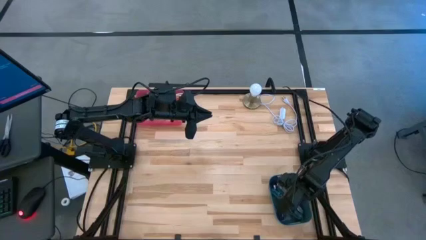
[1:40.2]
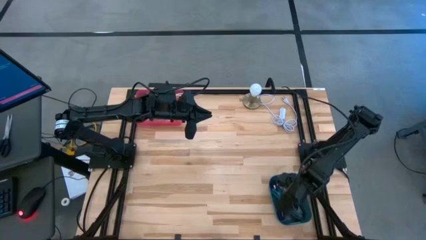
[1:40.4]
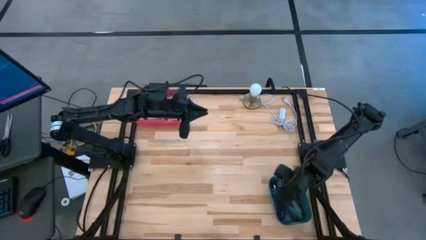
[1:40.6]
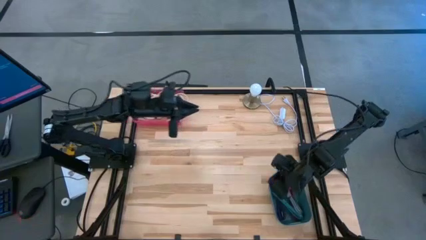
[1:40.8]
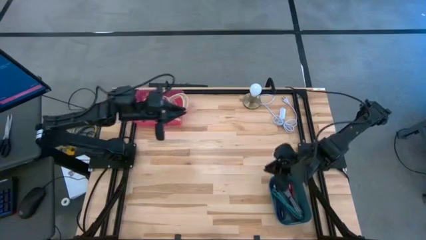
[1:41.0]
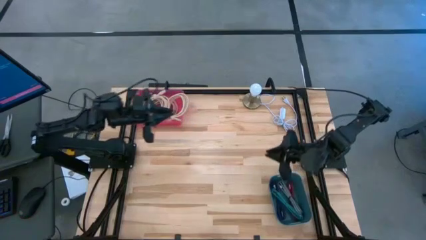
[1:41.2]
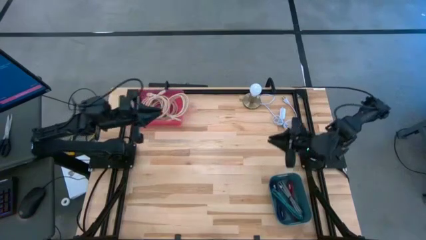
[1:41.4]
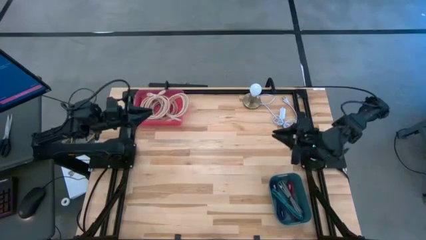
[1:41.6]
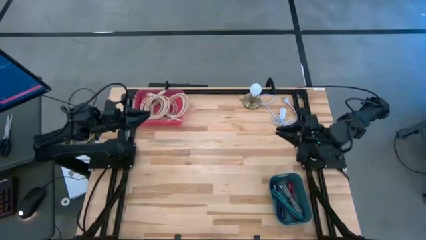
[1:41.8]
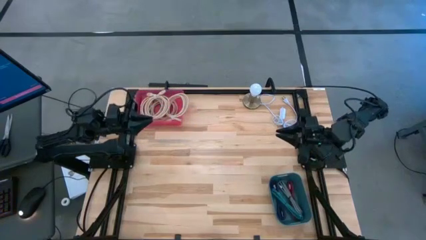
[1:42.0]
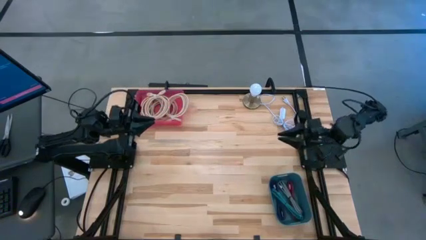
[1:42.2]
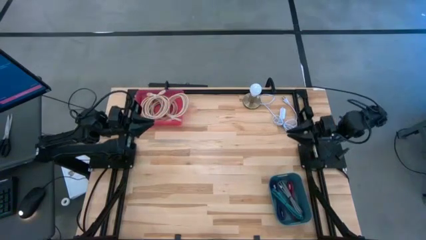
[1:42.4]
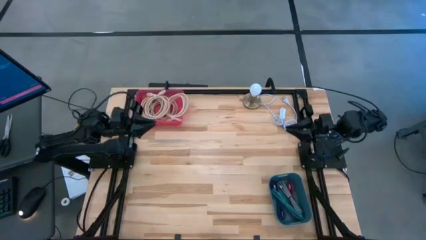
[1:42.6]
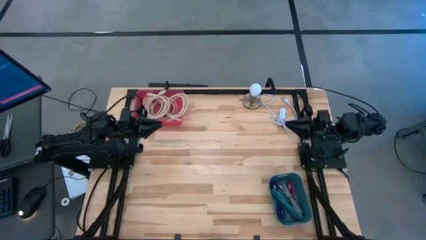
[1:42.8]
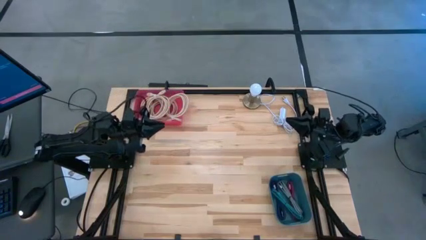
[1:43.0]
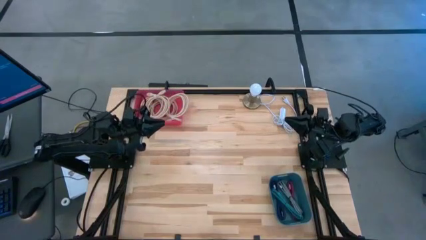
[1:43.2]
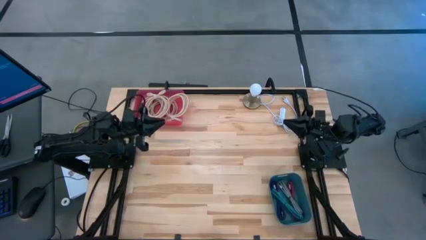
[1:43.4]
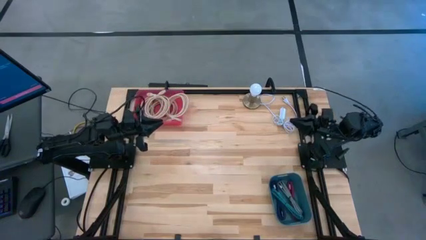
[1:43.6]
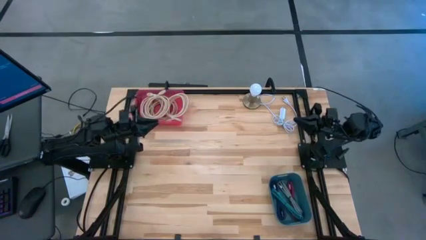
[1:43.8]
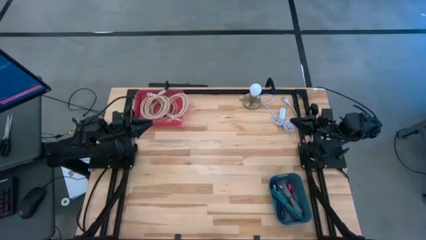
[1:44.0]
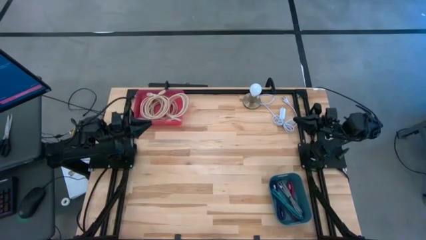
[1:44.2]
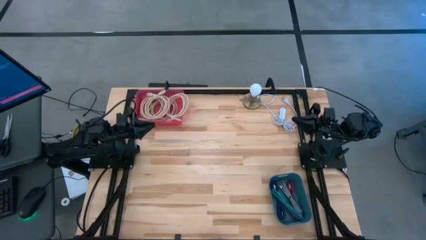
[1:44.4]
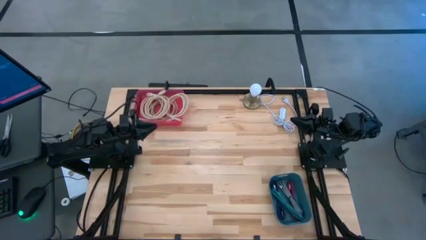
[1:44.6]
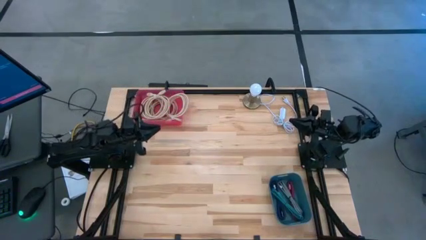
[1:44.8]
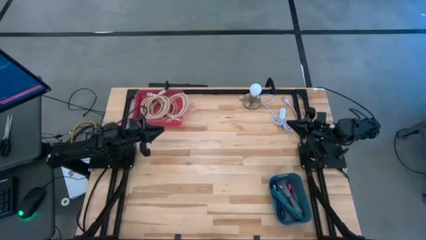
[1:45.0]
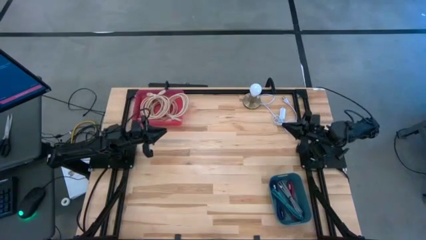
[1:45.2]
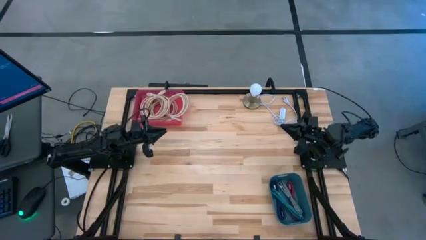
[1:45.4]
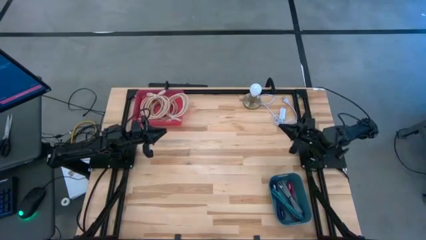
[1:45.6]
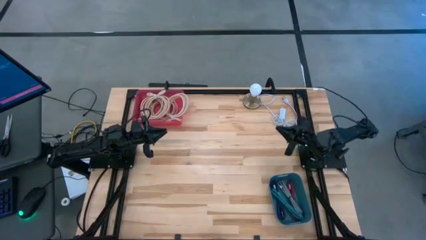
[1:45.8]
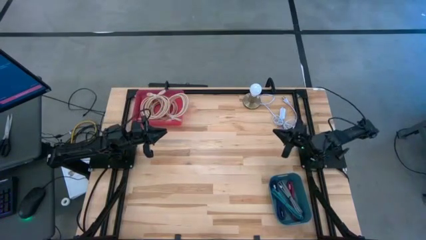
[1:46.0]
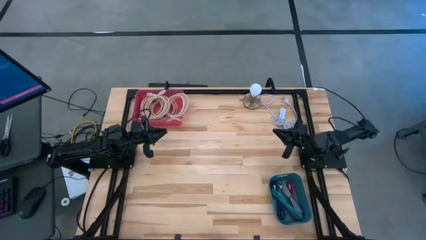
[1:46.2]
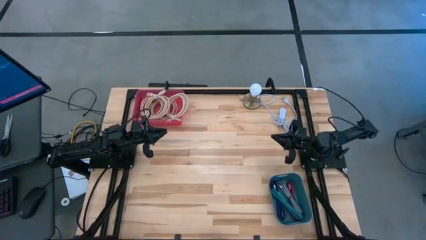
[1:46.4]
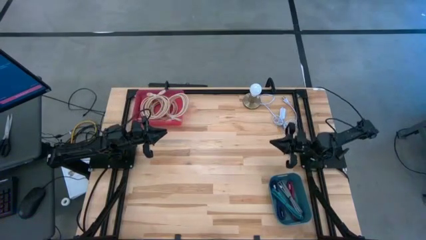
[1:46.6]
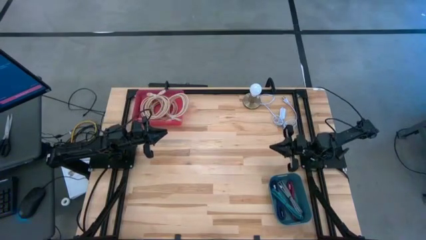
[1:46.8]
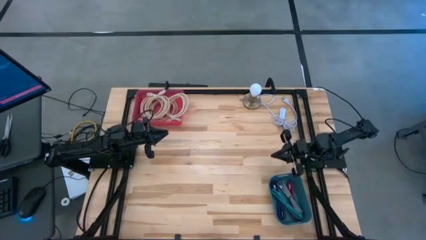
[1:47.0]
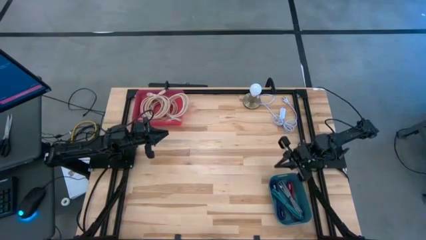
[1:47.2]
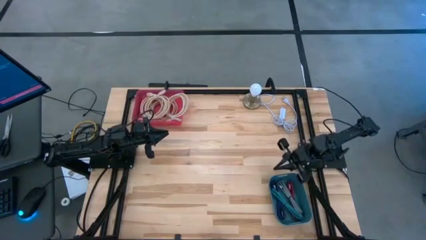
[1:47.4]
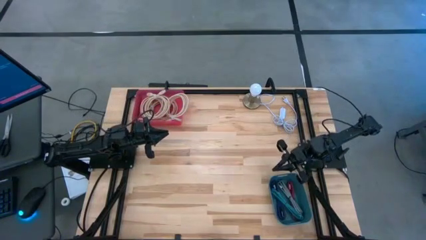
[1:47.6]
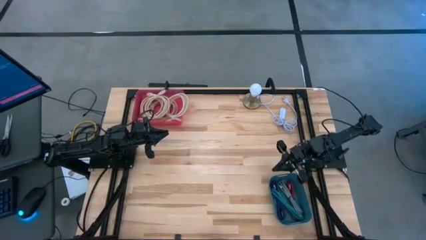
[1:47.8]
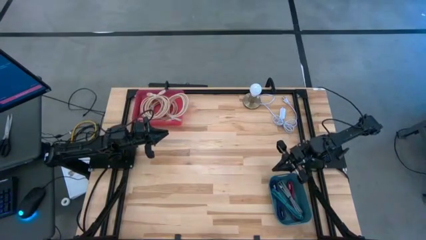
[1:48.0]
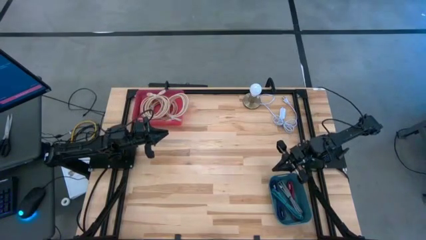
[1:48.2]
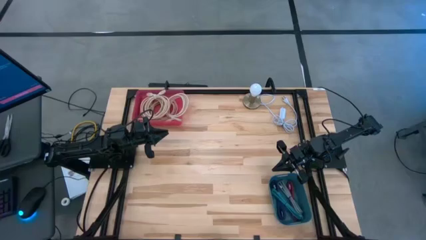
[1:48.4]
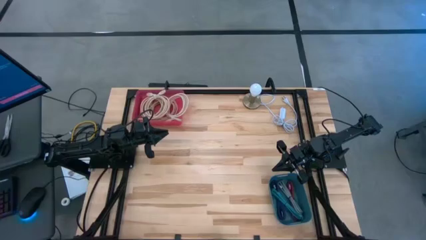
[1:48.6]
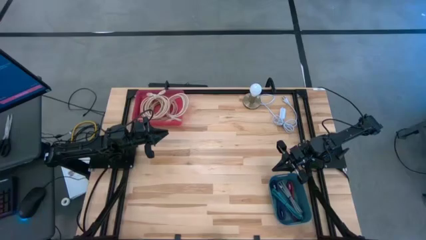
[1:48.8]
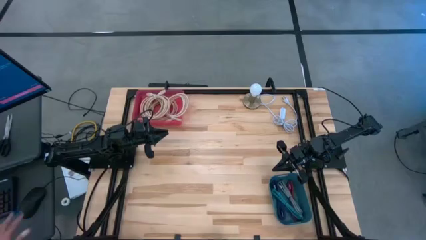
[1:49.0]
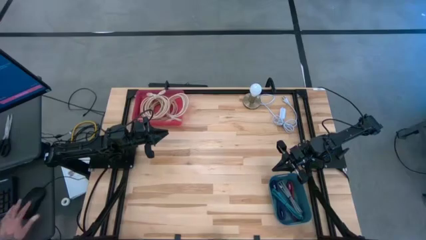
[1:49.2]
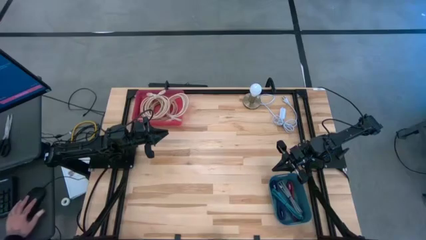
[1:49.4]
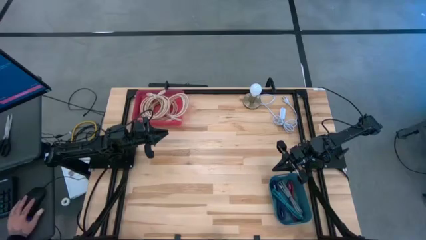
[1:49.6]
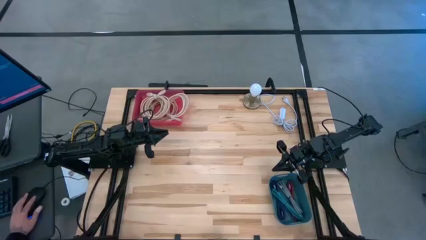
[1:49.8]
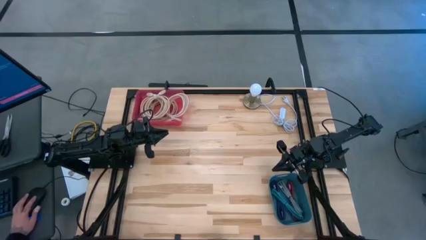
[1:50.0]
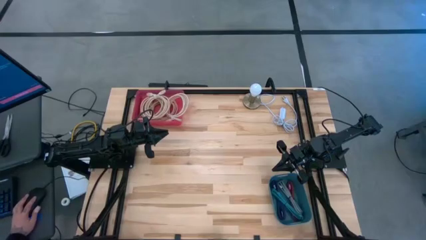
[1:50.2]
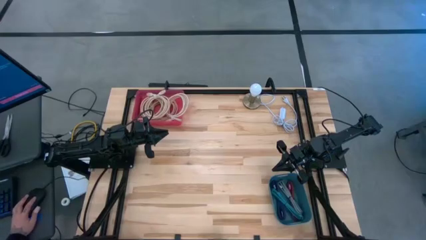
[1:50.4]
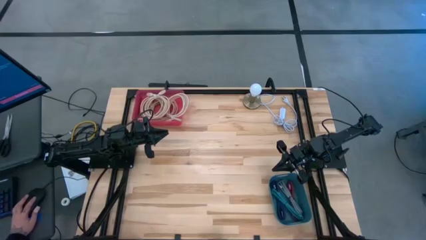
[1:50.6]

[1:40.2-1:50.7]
Task: Pick & Place USB Port
Return to Home Position

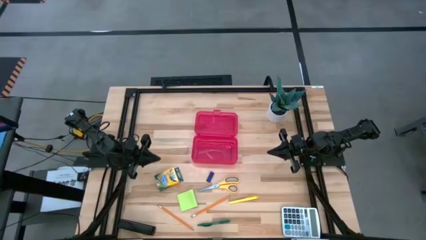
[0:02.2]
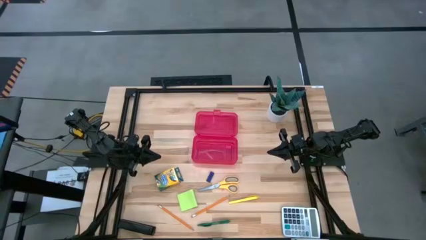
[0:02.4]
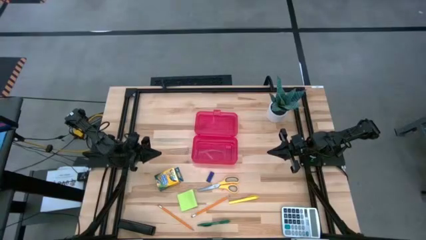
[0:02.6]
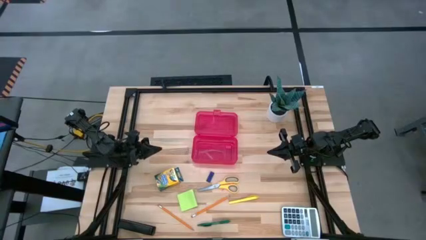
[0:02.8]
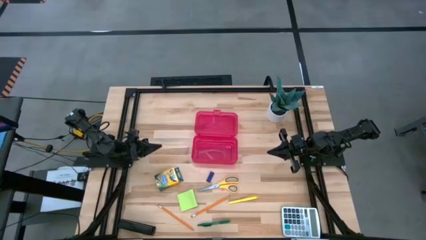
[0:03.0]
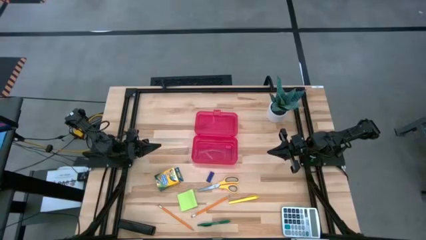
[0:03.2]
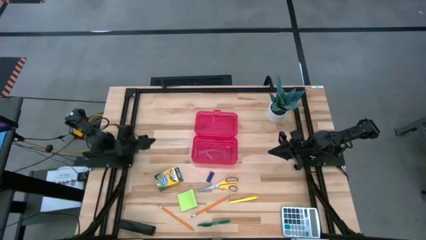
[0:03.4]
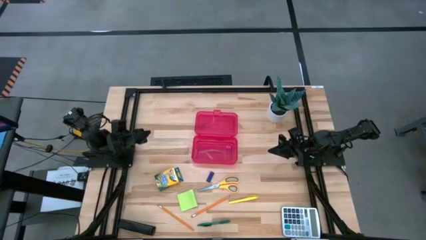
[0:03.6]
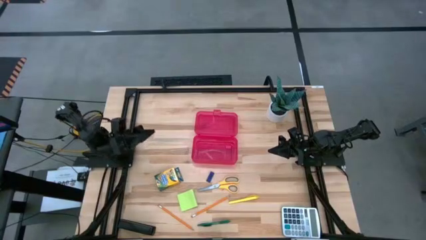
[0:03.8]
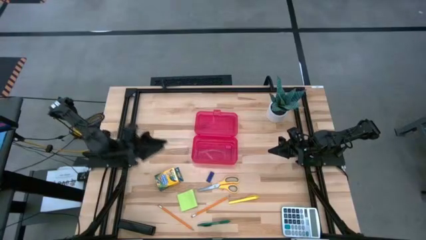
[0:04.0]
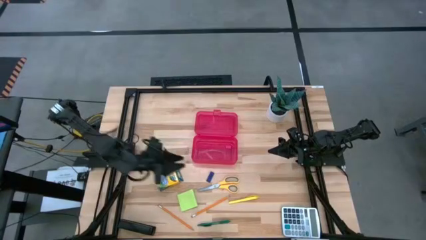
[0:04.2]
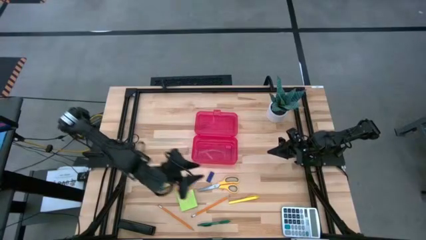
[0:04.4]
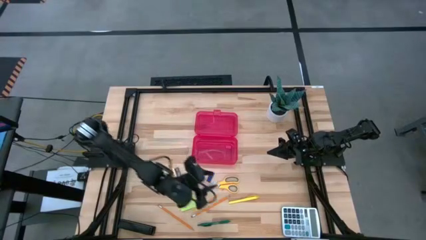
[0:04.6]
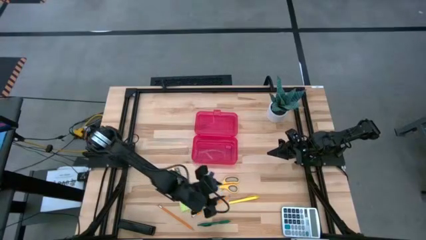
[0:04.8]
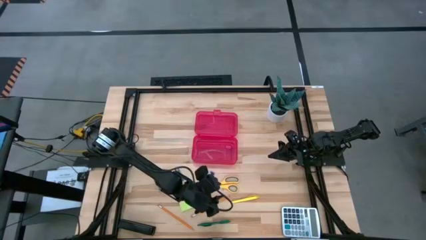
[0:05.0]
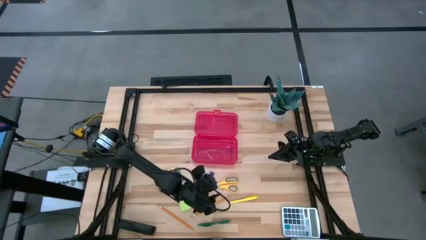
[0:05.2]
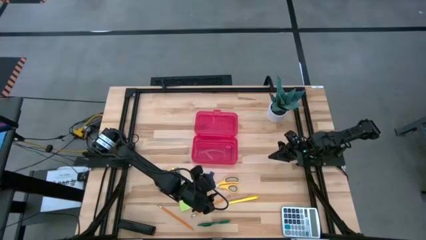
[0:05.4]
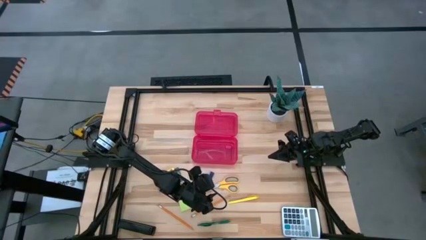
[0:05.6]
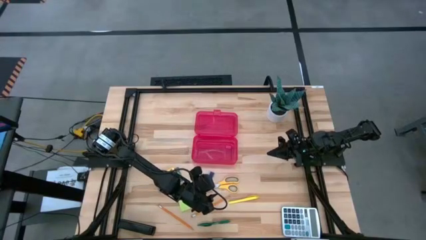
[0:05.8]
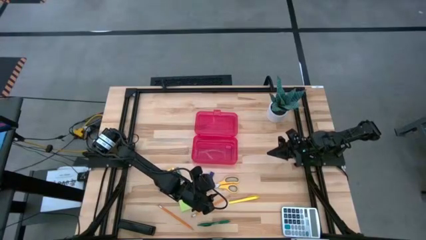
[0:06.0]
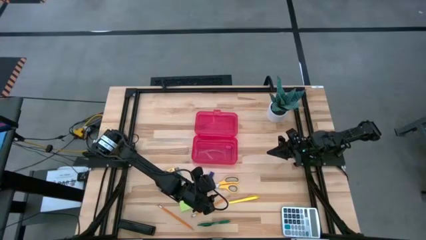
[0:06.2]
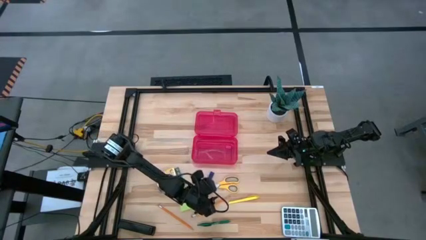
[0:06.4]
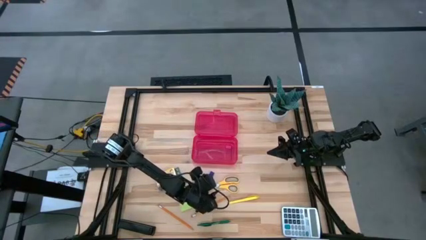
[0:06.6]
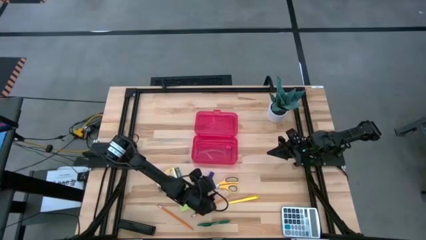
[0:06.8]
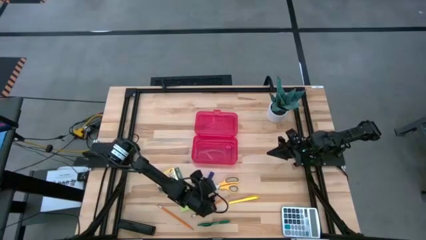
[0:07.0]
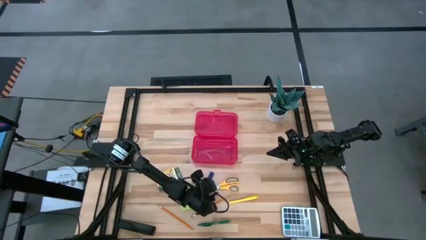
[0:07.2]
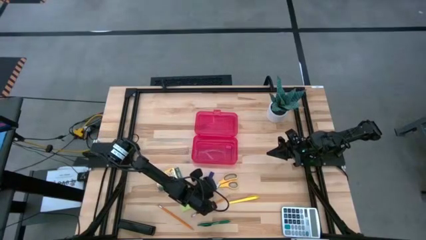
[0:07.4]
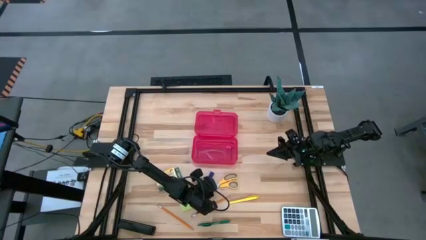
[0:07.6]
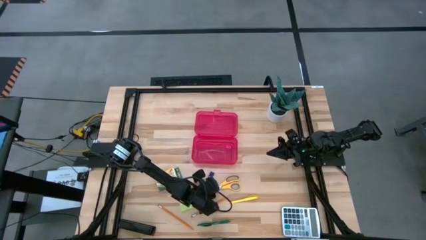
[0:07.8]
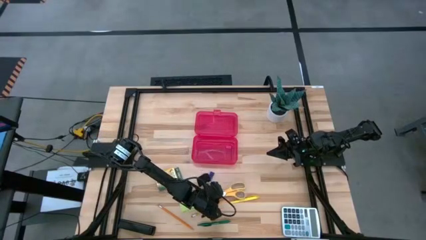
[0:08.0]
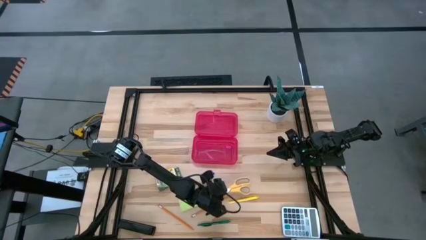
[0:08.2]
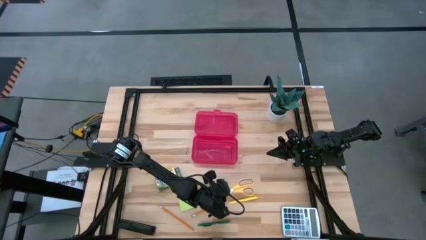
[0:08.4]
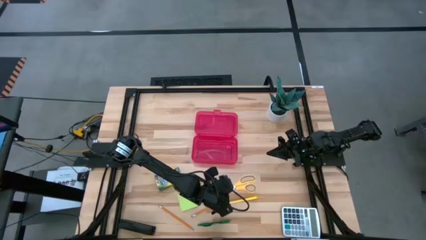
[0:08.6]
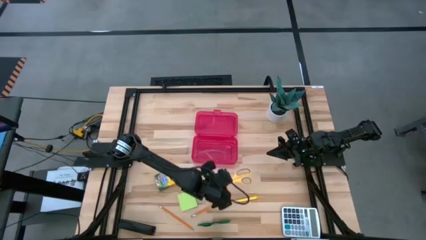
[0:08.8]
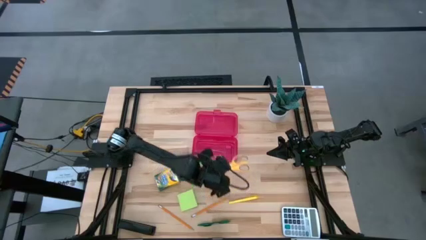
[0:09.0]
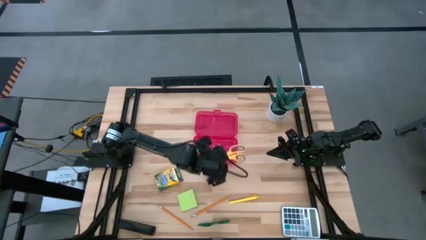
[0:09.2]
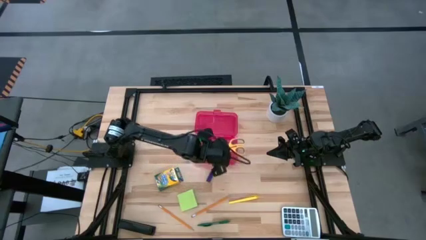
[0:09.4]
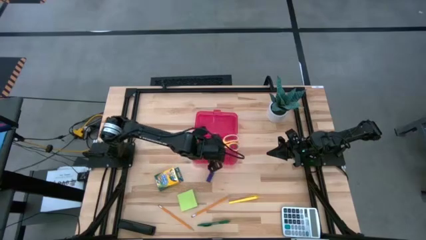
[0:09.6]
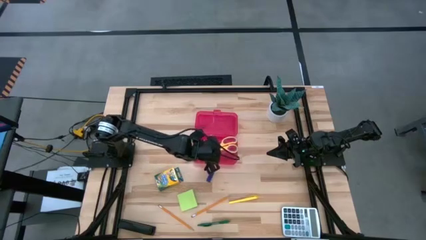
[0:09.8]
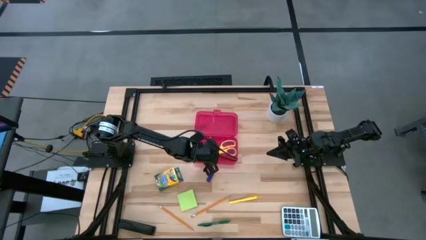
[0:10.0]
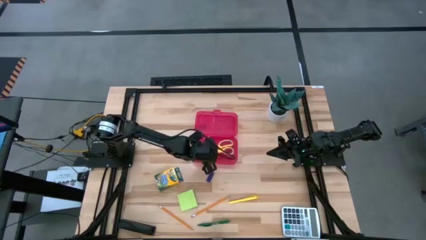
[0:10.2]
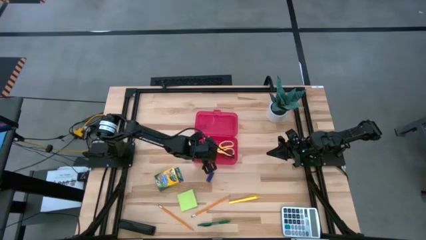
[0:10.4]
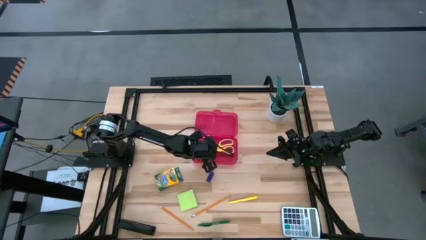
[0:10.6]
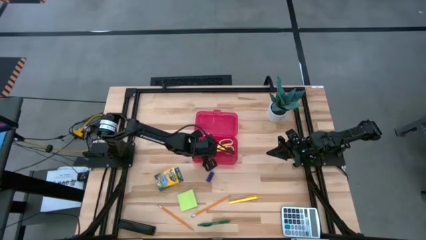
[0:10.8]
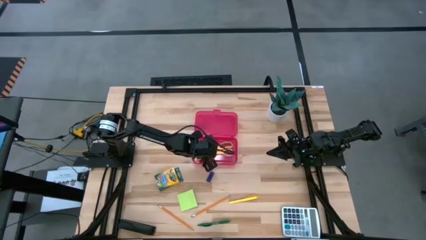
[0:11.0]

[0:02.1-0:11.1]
Task: Pack school essentials
Put the yellow scissors into the supply box
